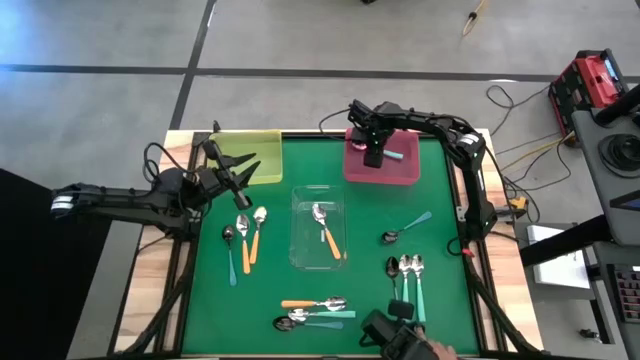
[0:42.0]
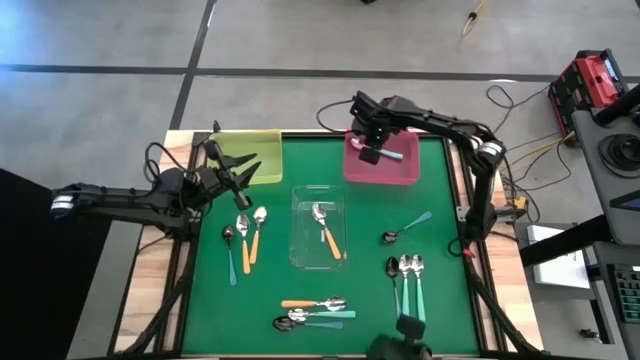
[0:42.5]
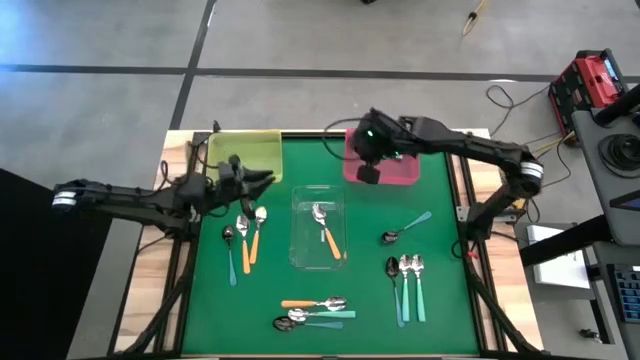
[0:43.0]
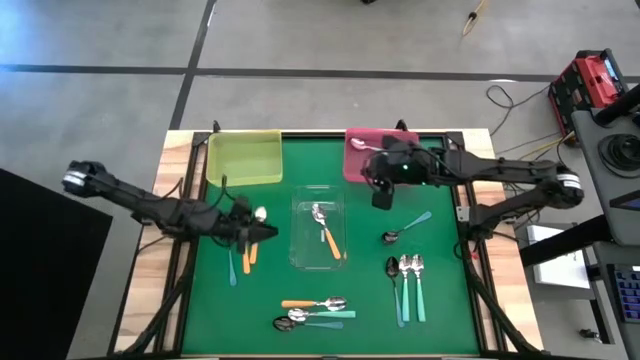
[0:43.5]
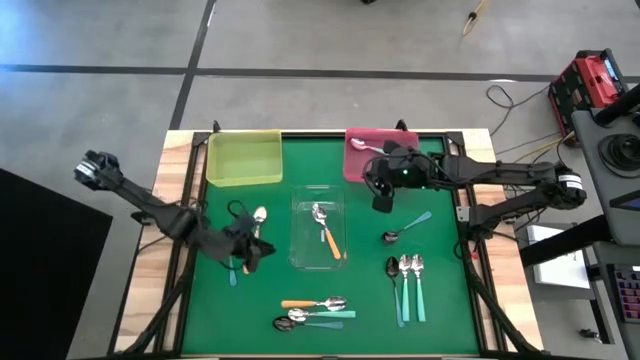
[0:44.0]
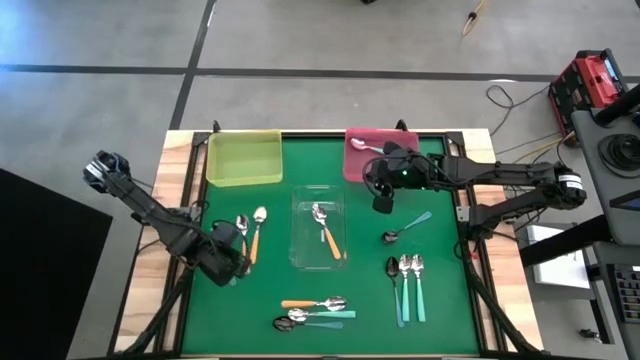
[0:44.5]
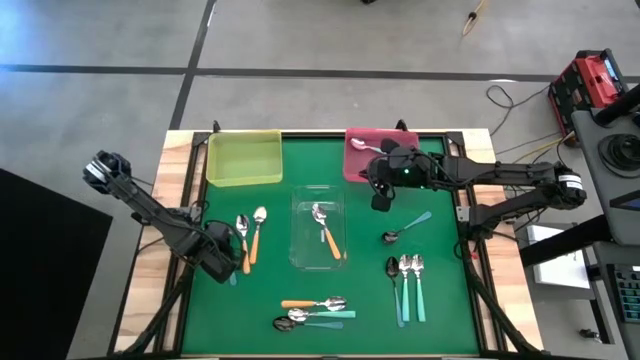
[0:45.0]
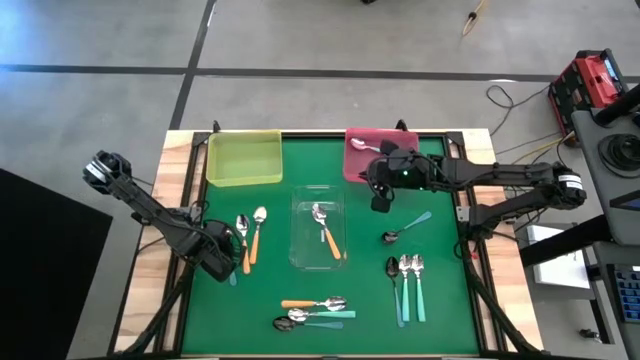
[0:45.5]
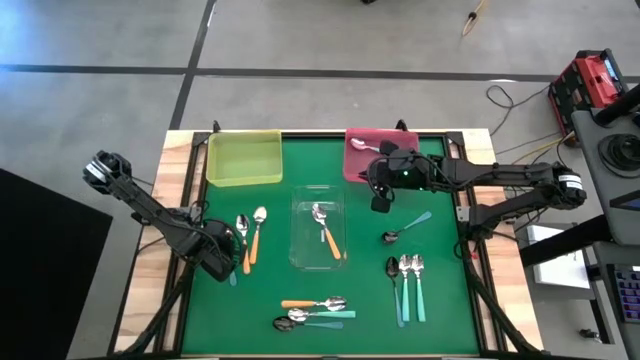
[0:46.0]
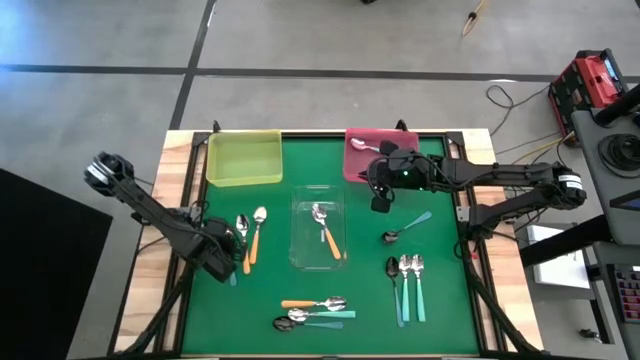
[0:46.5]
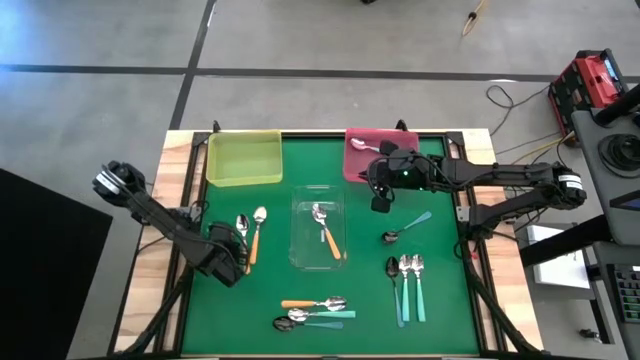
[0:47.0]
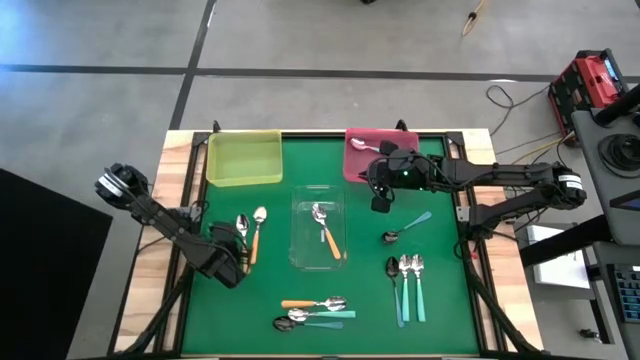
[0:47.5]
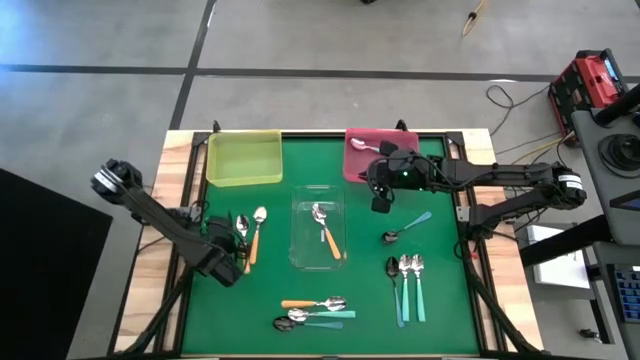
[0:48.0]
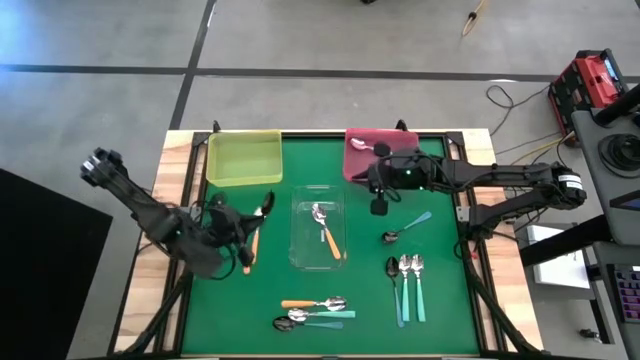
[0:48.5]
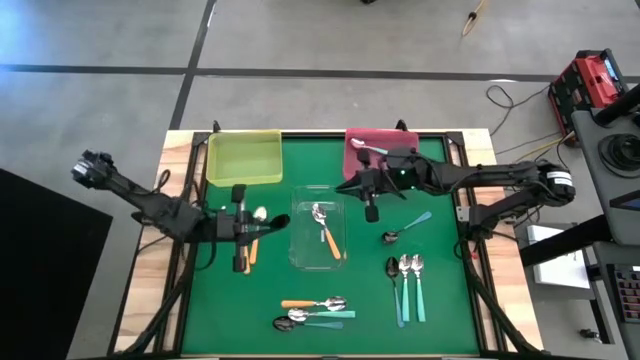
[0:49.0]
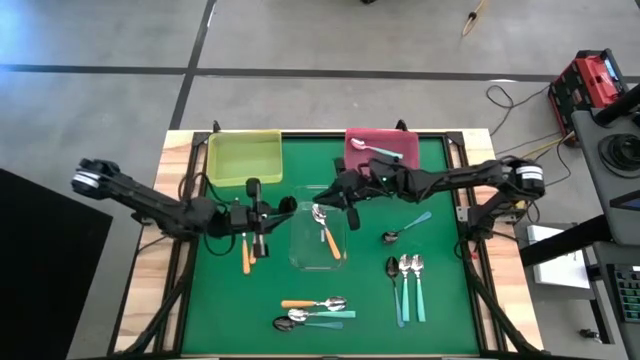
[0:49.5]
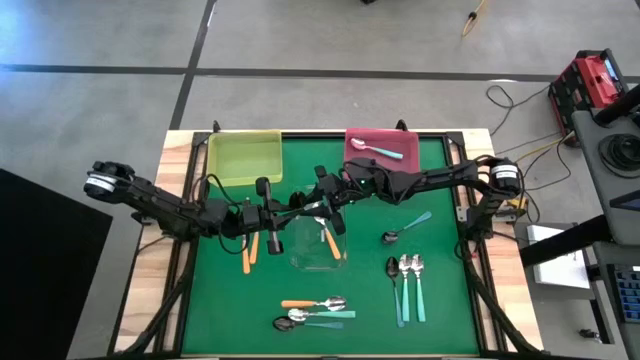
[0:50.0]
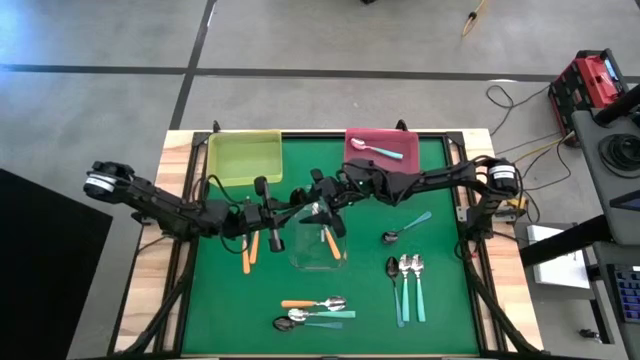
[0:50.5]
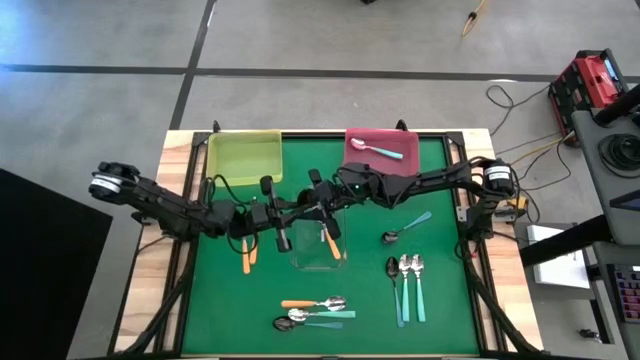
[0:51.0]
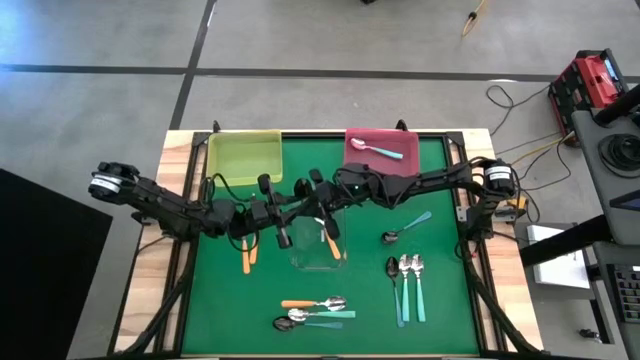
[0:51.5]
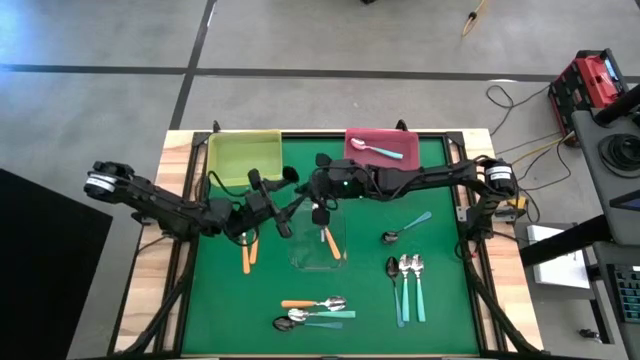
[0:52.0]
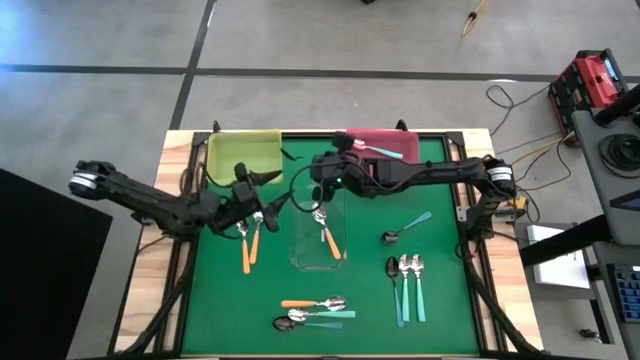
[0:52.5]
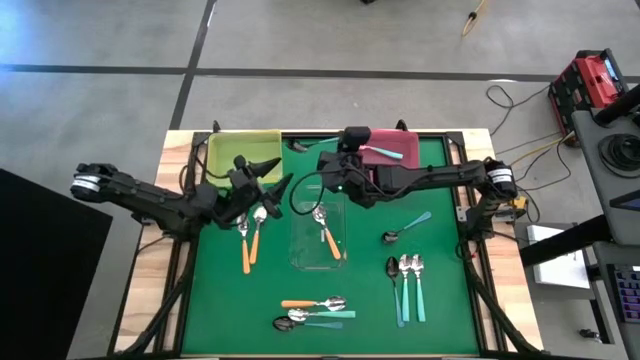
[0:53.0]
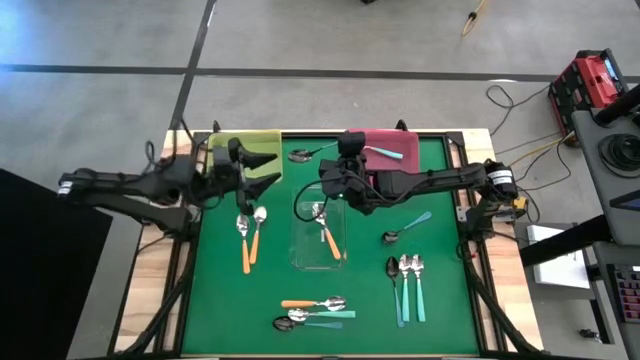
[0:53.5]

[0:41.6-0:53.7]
Task: Sort silverware by color (type)
Put the middle left blue spoon into the yellow bin

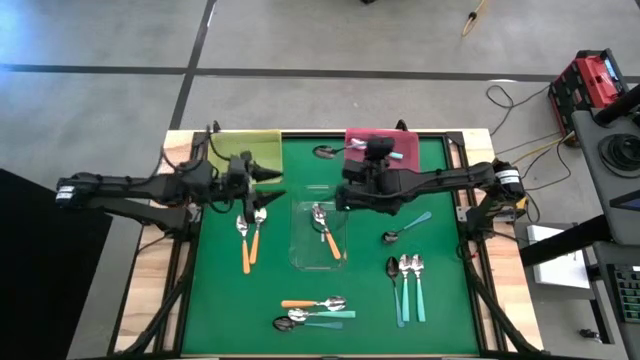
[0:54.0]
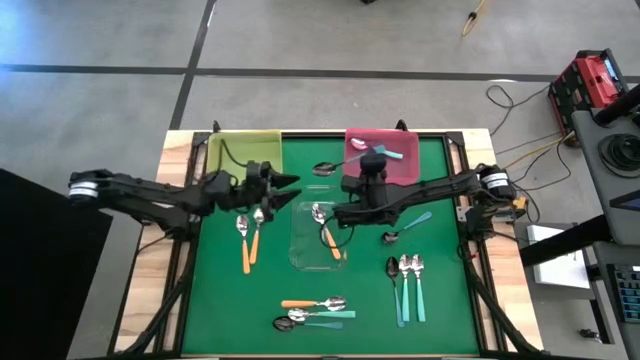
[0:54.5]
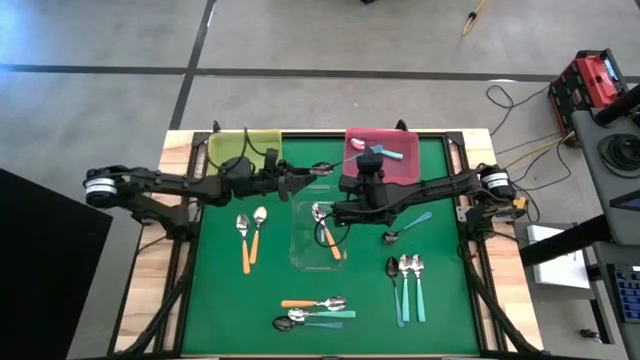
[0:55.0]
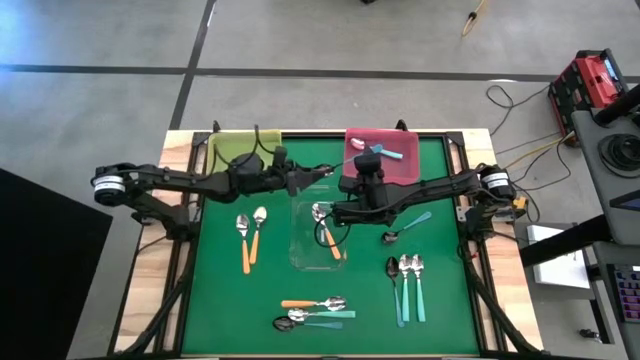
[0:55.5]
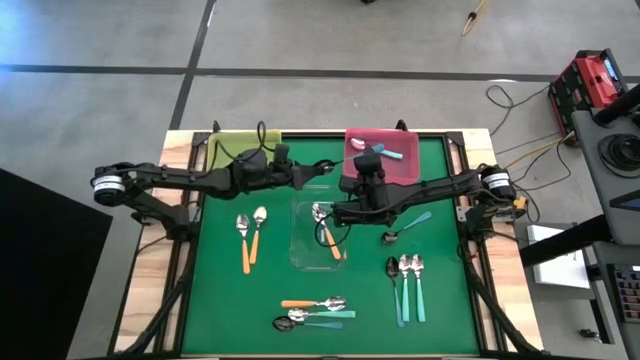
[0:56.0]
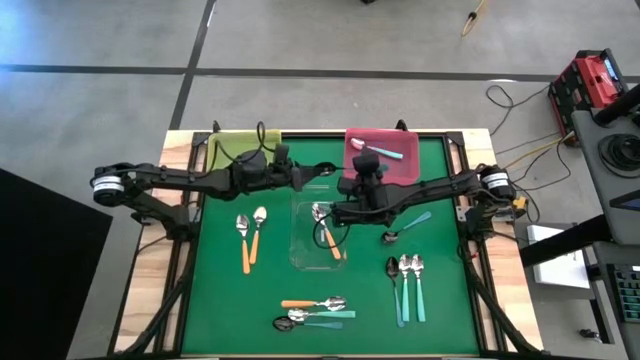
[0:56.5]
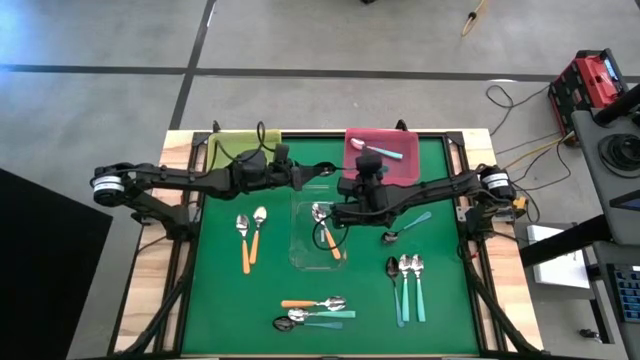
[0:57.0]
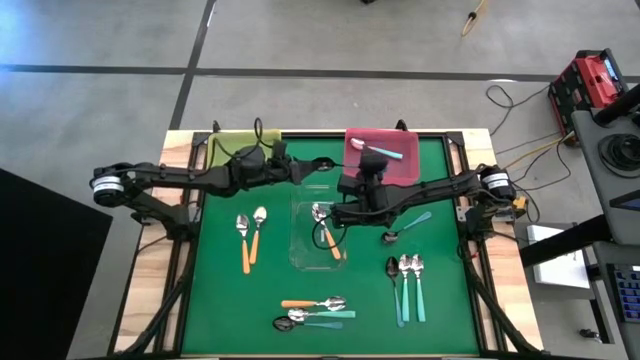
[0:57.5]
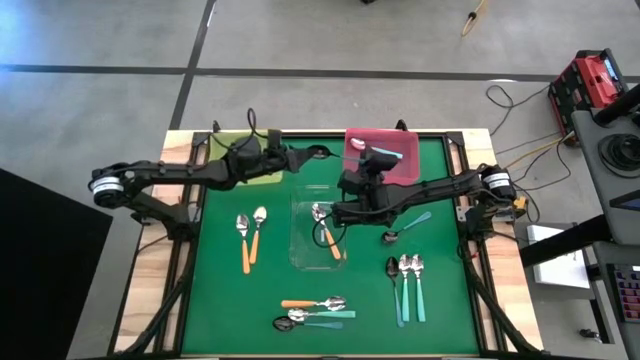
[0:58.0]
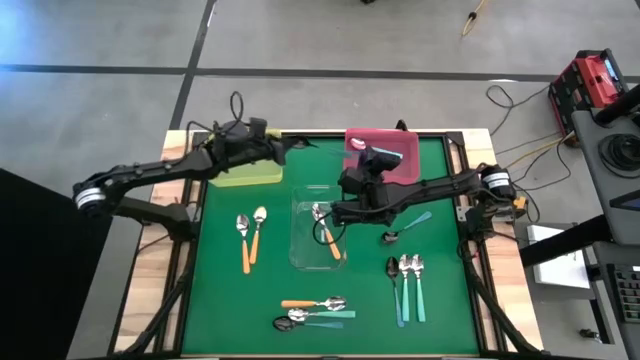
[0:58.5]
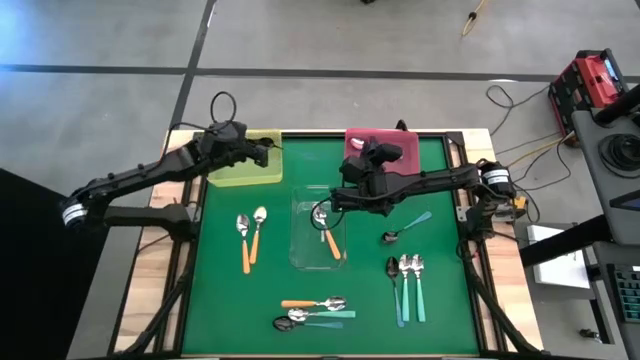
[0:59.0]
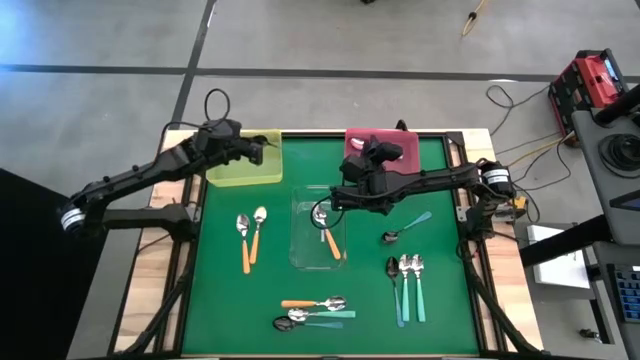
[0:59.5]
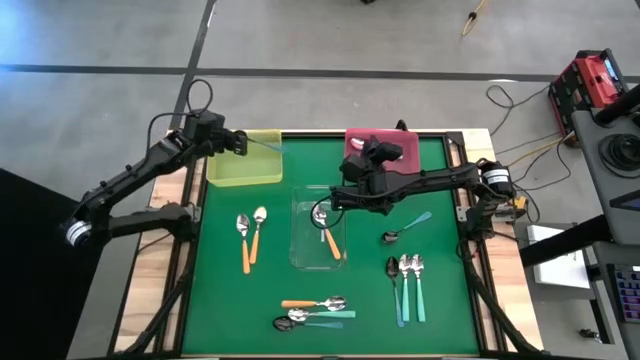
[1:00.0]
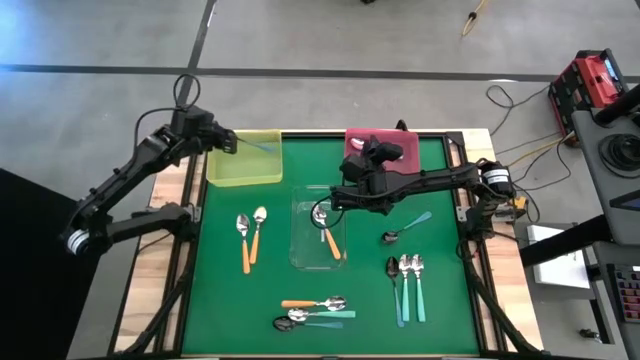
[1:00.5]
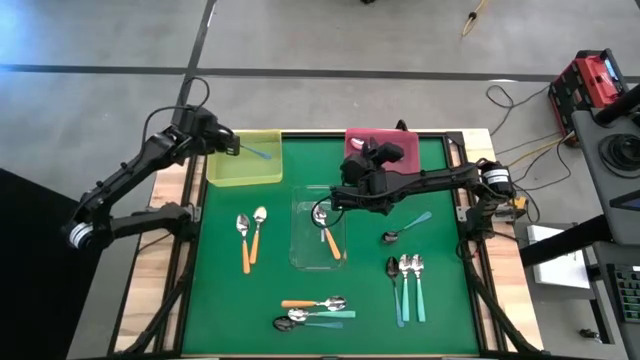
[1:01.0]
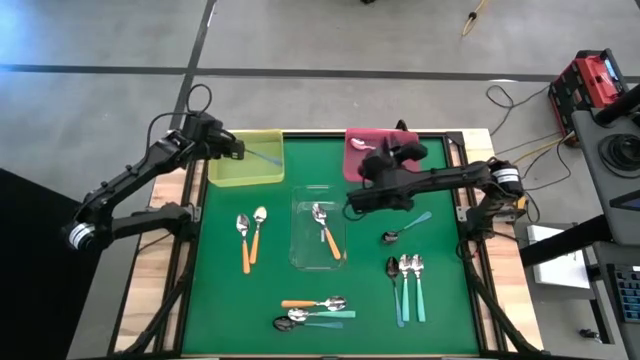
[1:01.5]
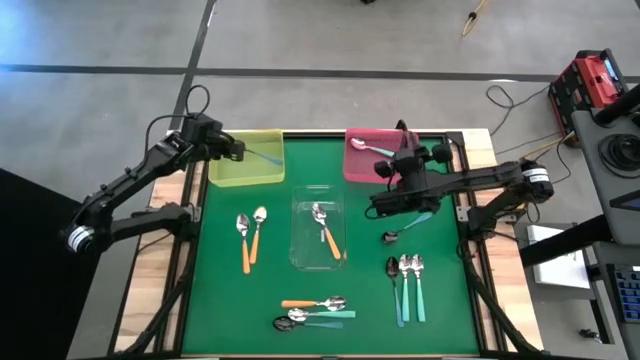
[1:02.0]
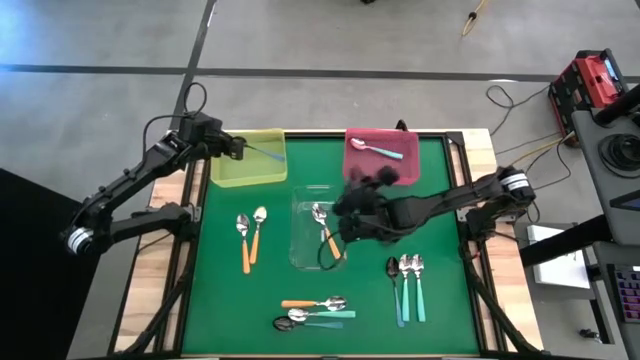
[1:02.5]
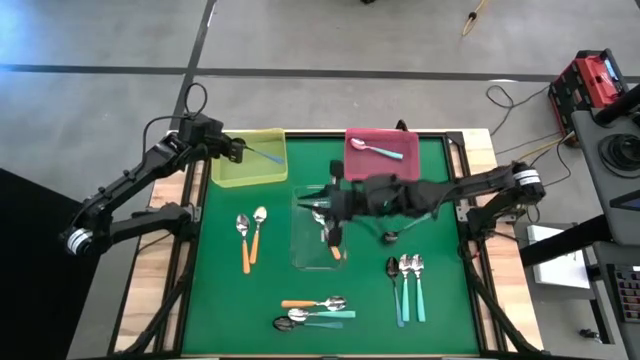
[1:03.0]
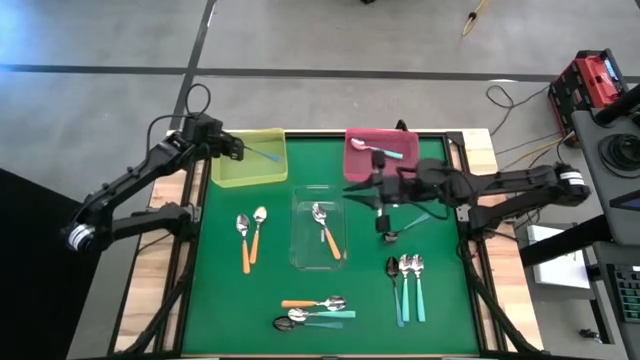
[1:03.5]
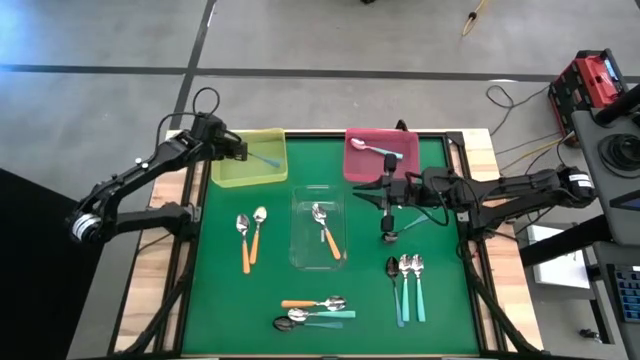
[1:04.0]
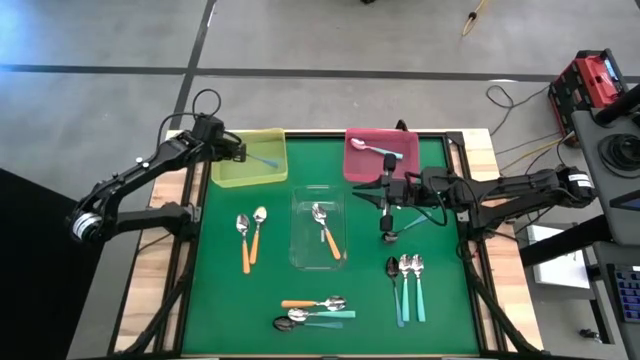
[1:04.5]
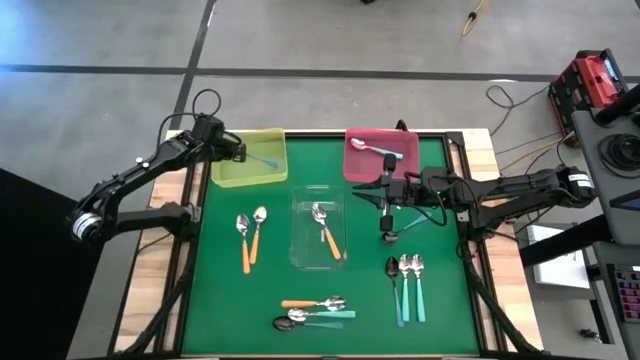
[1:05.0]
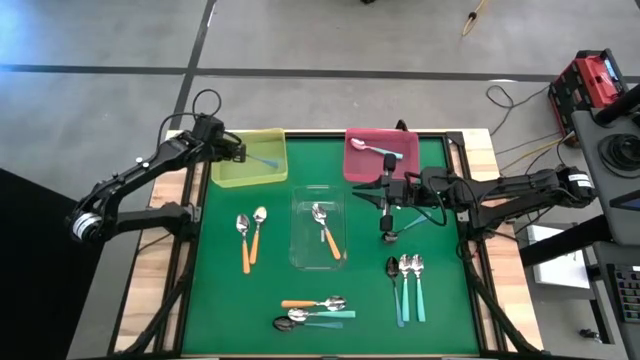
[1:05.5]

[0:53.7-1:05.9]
Put the middle left blue spoon into the yellow bin
